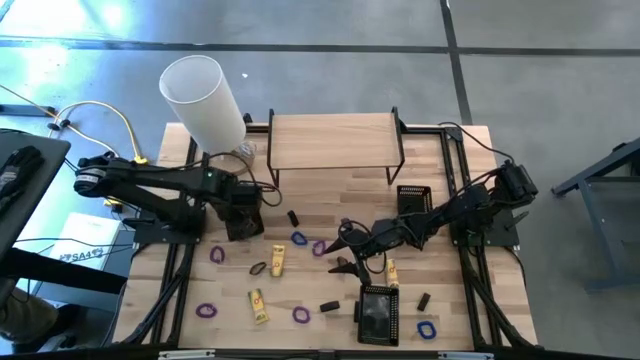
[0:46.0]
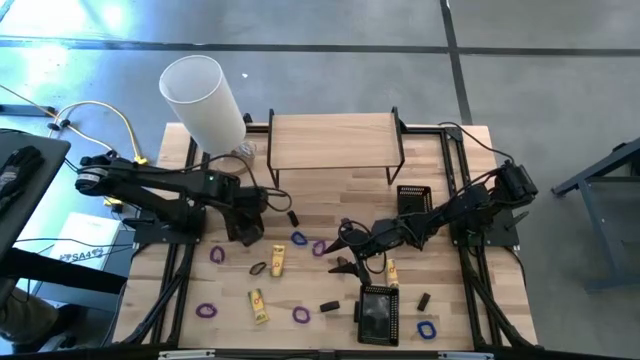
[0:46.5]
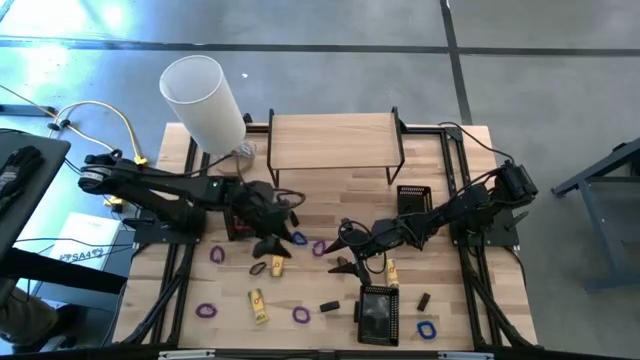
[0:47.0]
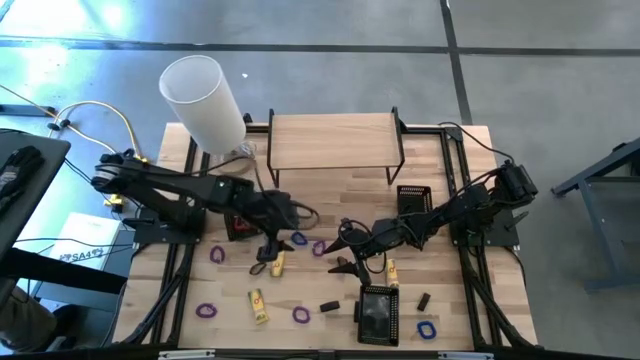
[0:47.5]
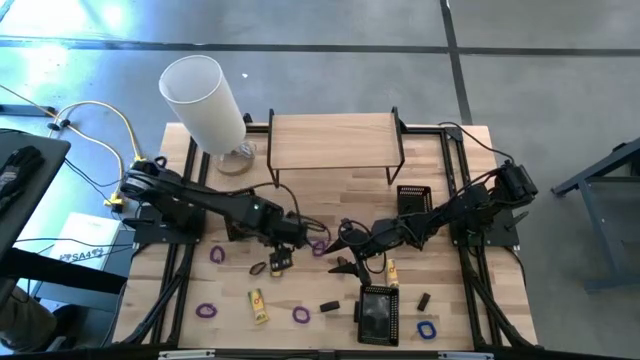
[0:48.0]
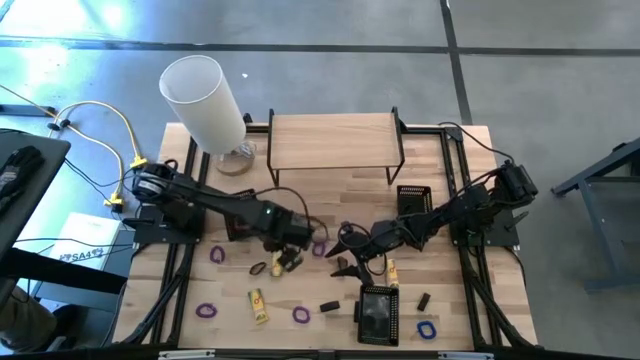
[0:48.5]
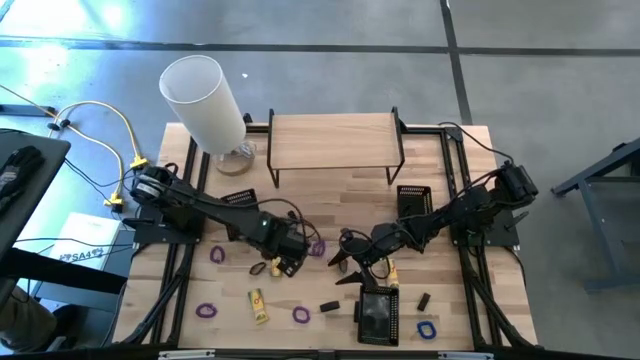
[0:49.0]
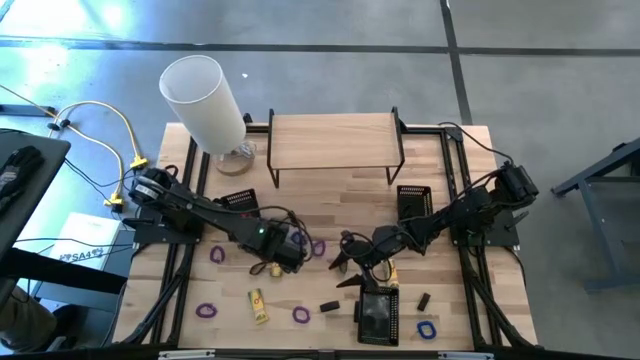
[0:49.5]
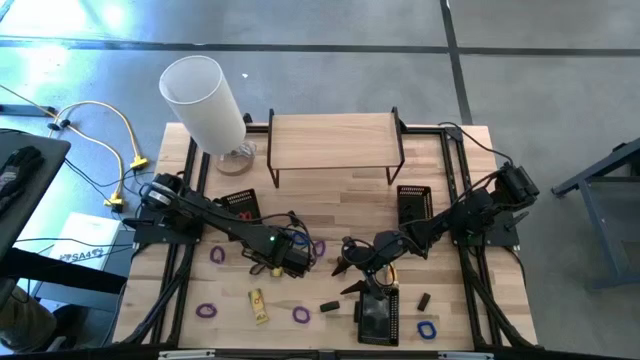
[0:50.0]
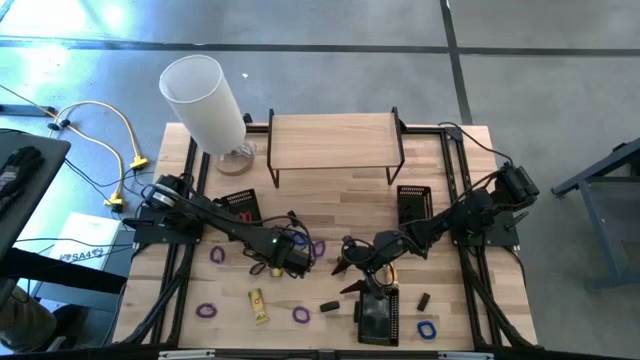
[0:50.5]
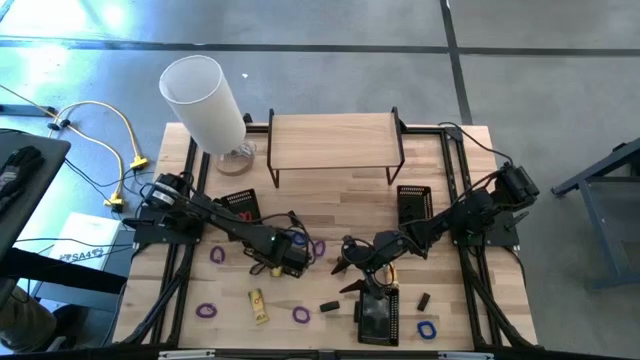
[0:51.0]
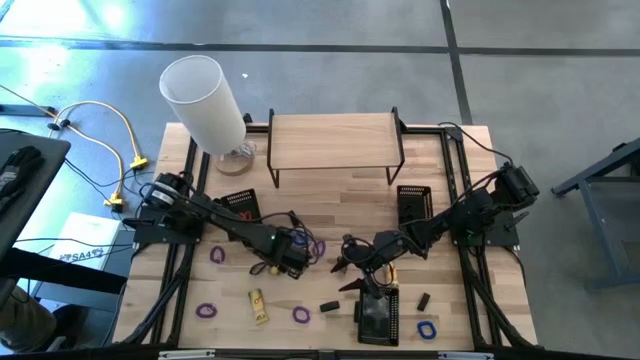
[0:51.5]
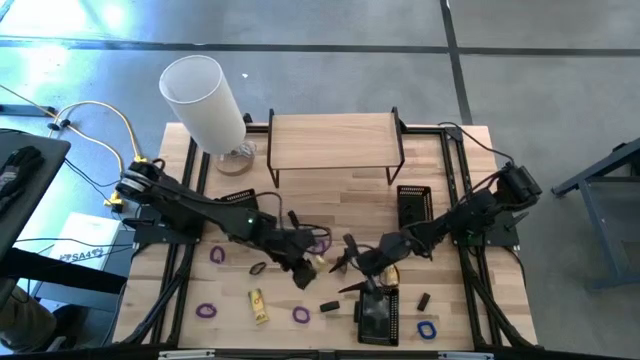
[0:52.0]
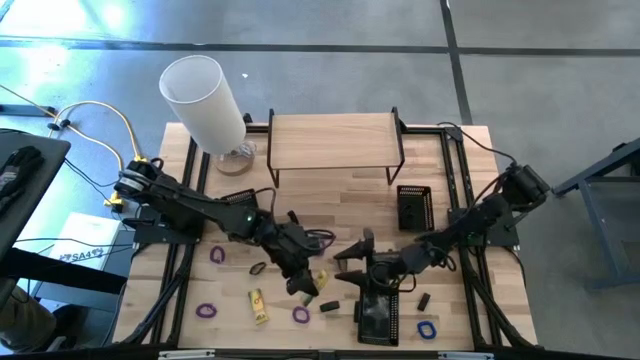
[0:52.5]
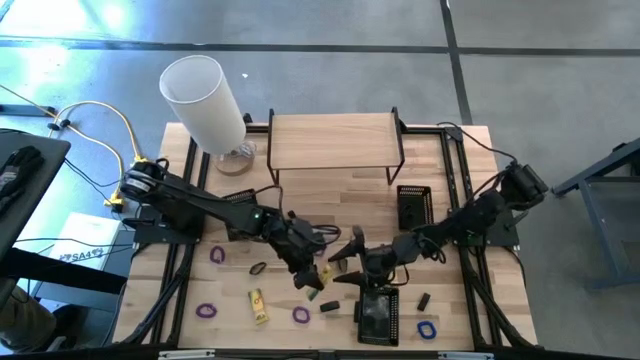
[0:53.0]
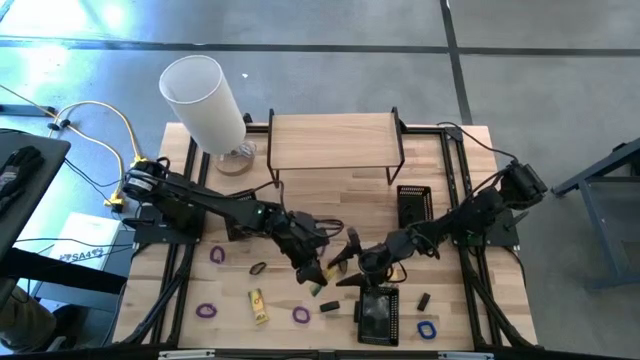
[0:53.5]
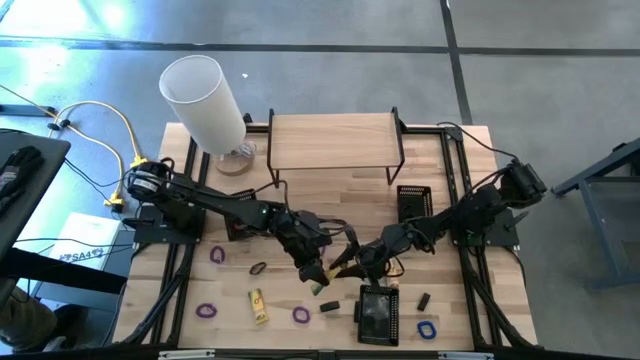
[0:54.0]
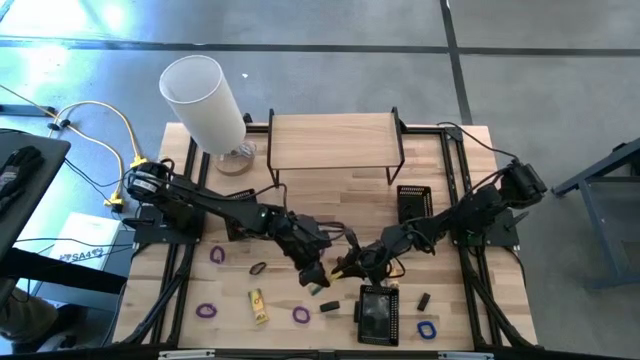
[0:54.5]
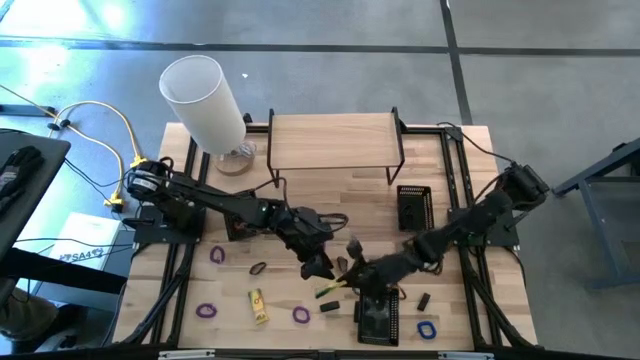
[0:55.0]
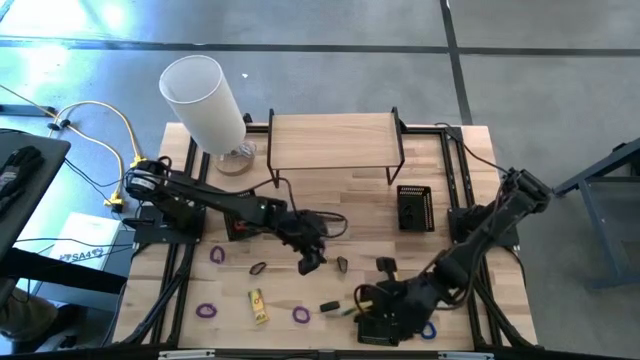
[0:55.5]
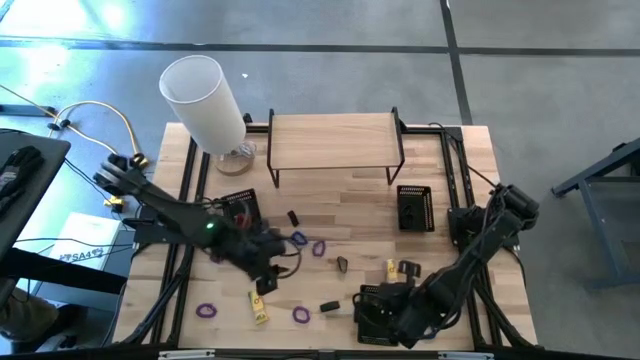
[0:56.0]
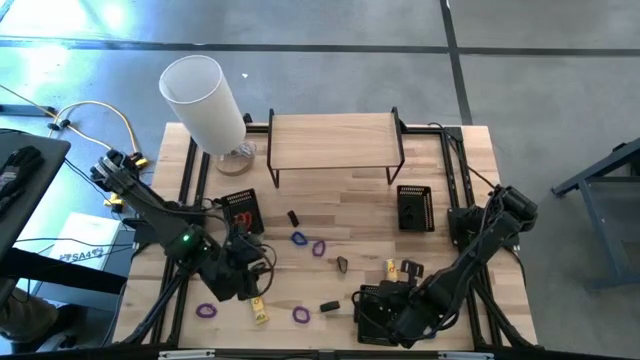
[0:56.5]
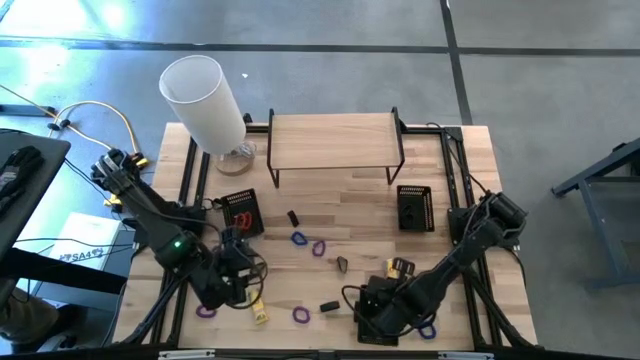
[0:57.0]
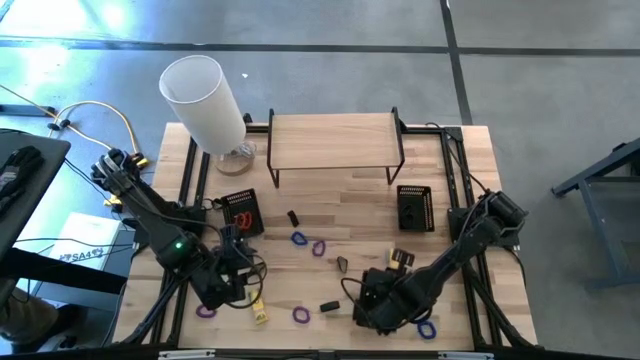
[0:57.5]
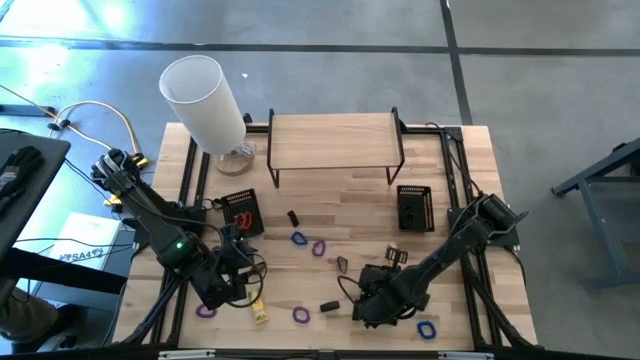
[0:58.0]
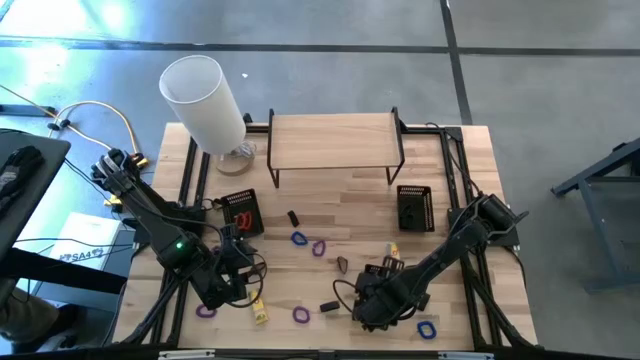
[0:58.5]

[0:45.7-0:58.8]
Task: Pick & Place Office Desk Supplies
Put the top left crayon box into the bottom bin

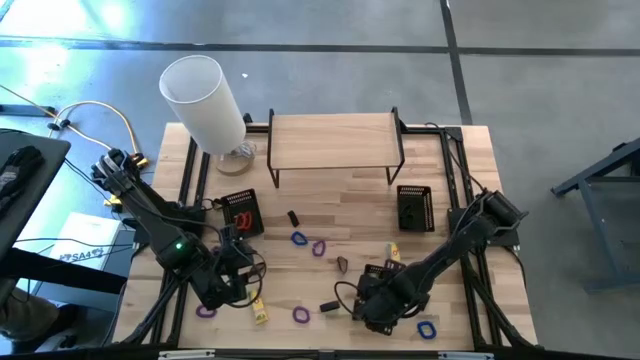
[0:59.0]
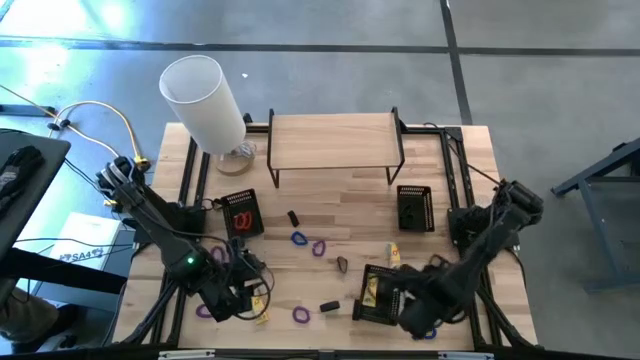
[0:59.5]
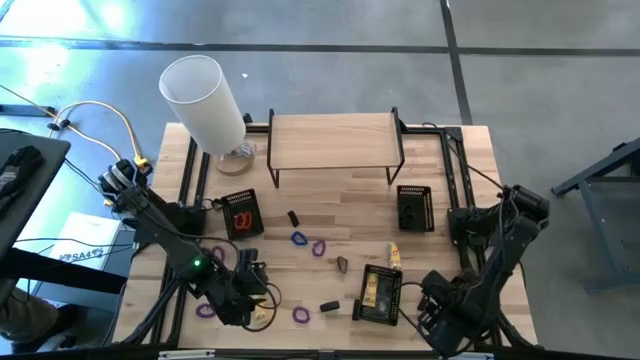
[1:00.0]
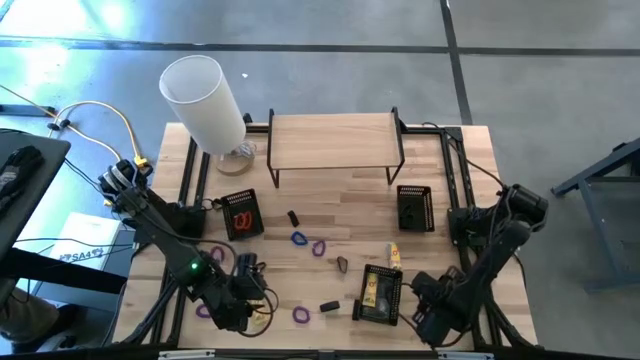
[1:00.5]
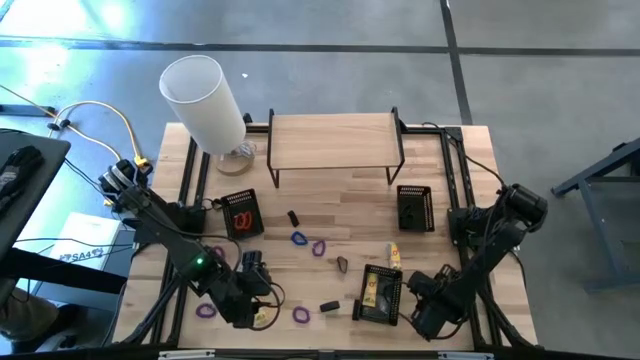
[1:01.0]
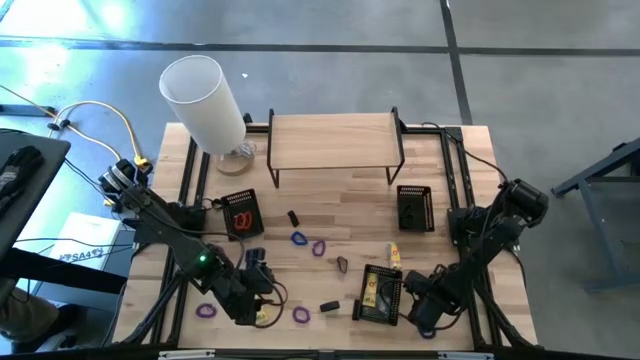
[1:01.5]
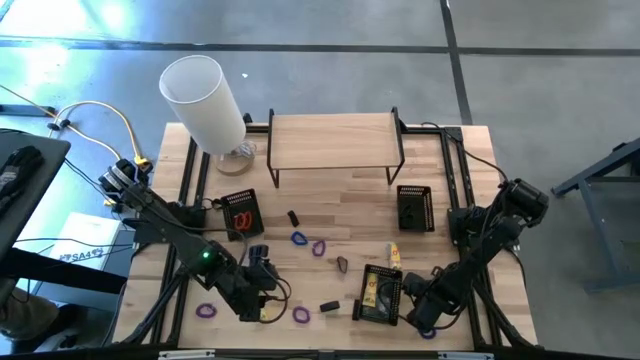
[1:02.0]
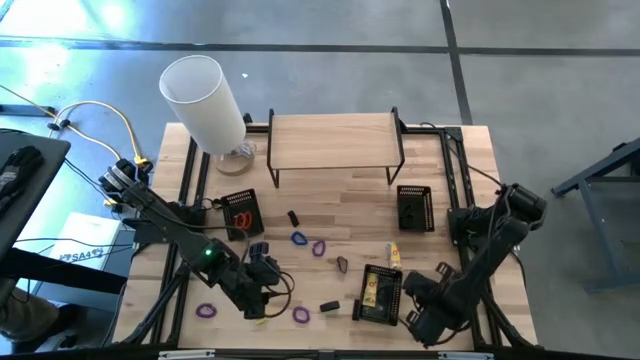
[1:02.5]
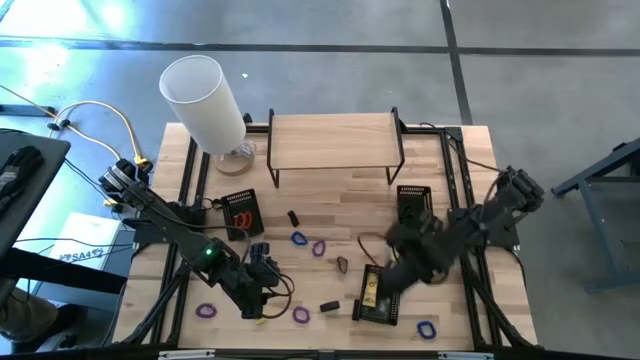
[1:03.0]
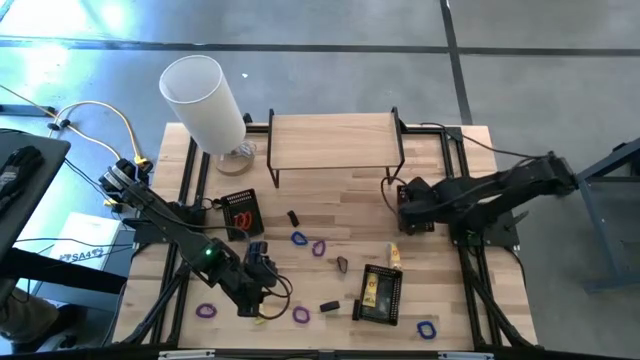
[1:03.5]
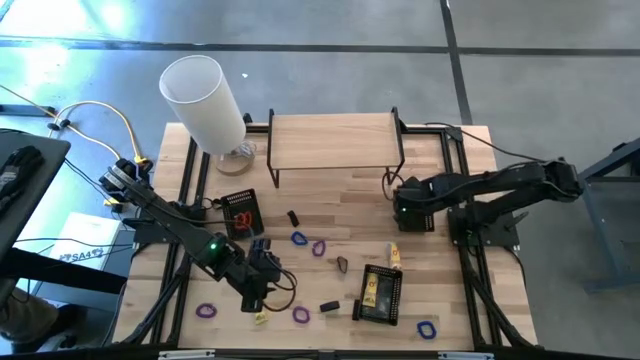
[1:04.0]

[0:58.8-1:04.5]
Put the rubber band into the top right bin

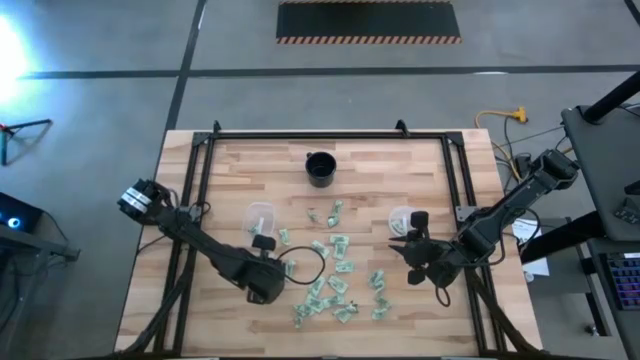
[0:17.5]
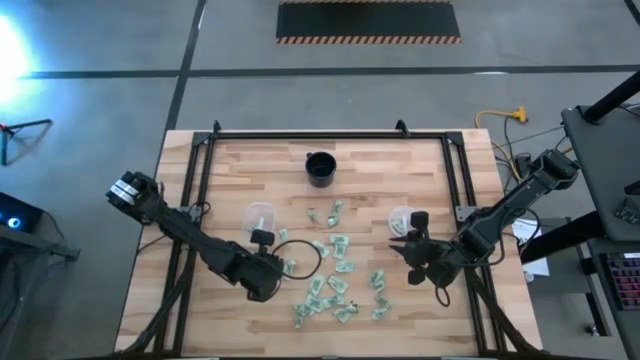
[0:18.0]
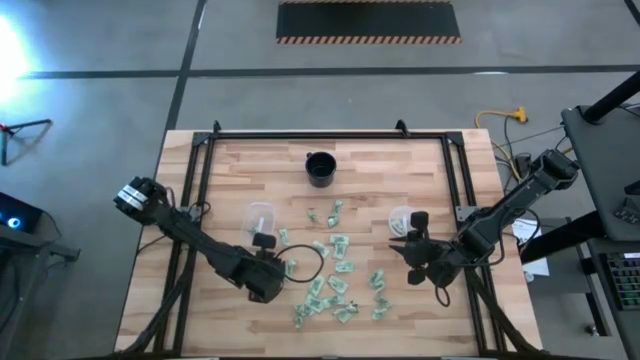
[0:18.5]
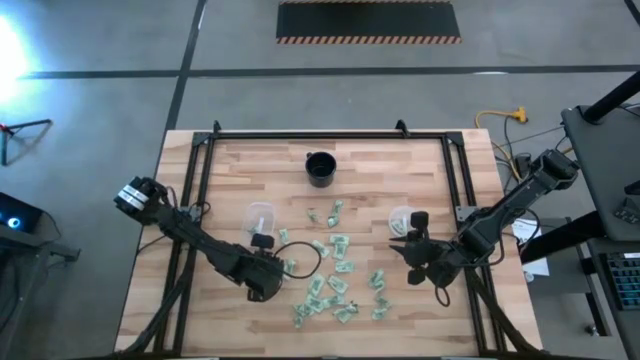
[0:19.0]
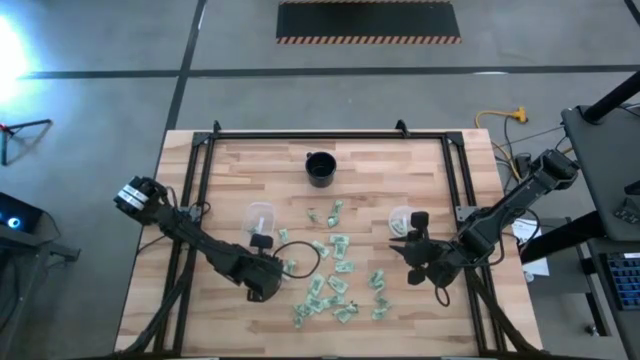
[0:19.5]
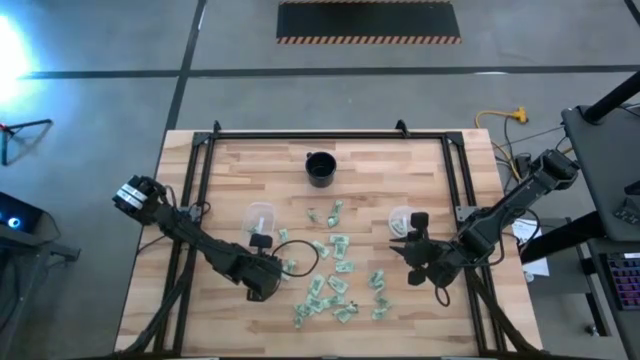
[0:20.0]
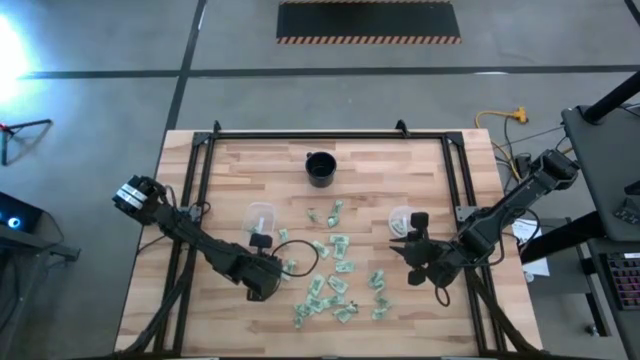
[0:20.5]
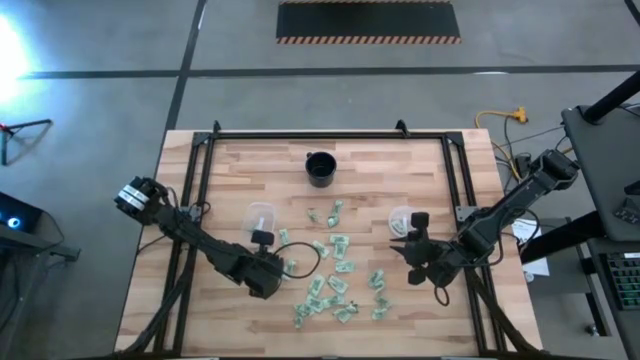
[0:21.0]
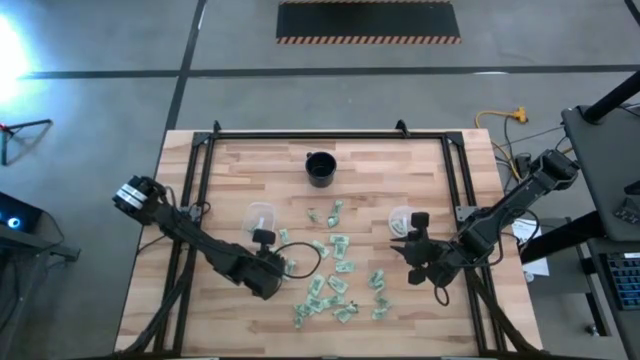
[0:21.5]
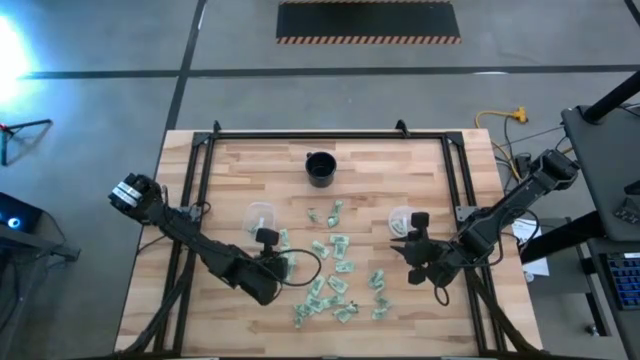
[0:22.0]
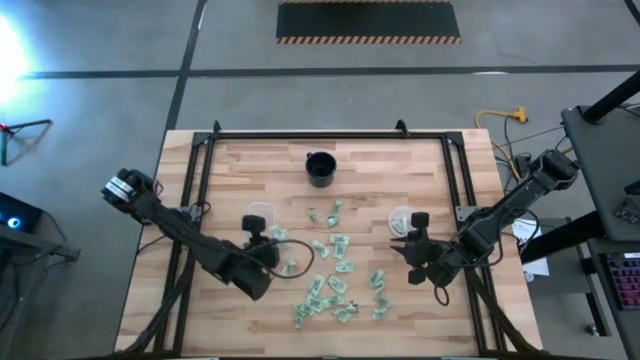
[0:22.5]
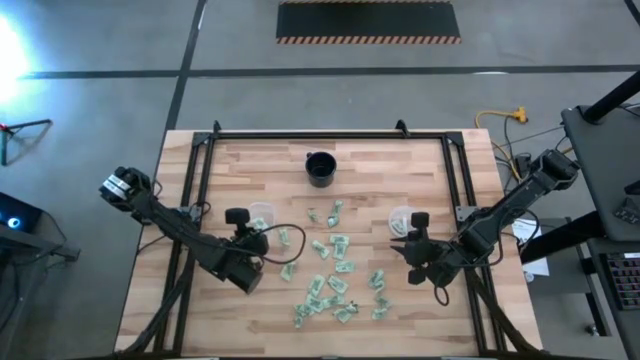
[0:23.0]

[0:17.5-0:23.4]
Task: Pick and place Stevia / Truvia into bins
Put the light green stevia packet into the rectangular container
